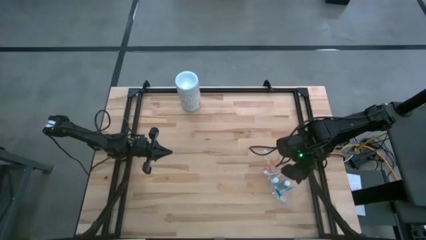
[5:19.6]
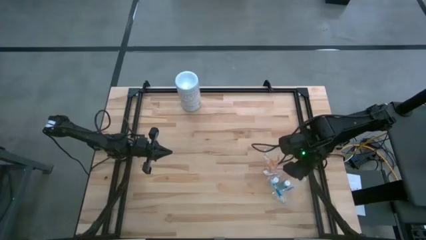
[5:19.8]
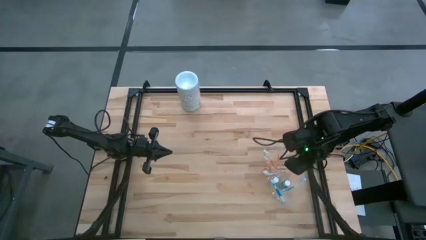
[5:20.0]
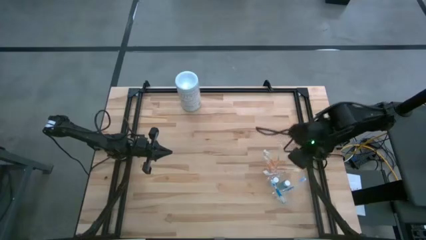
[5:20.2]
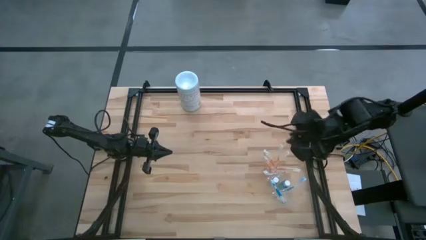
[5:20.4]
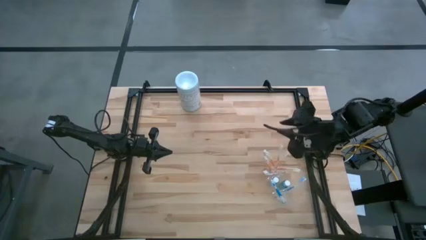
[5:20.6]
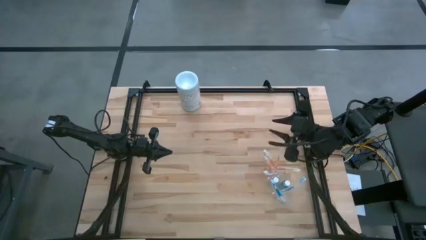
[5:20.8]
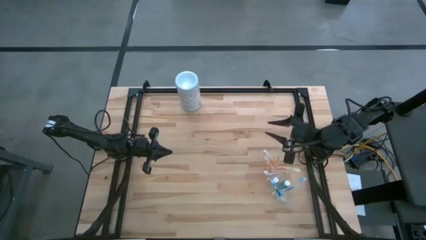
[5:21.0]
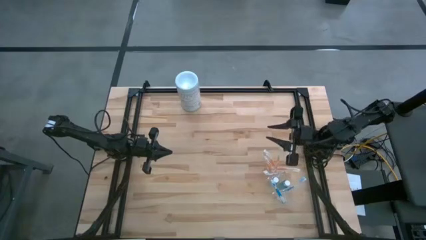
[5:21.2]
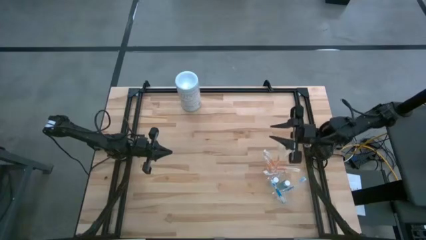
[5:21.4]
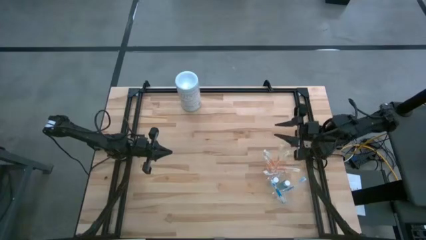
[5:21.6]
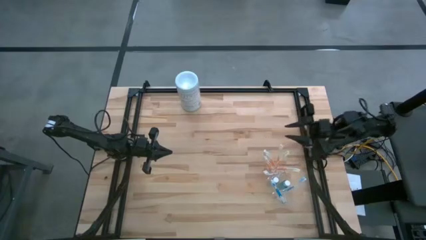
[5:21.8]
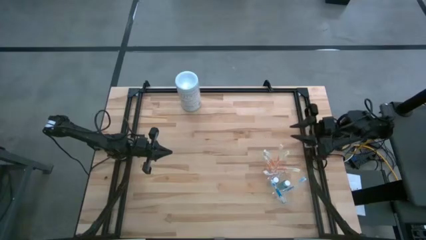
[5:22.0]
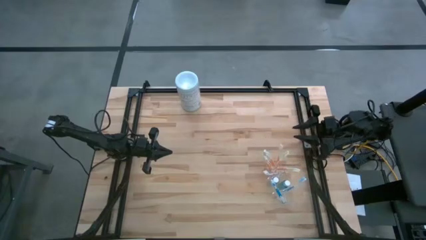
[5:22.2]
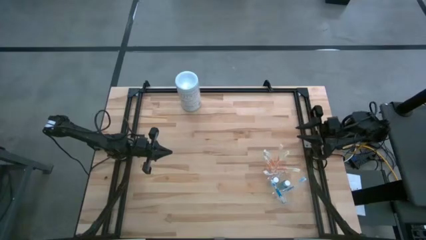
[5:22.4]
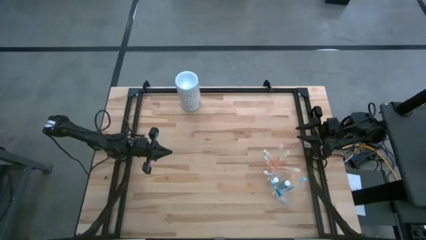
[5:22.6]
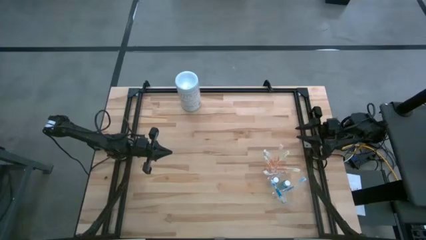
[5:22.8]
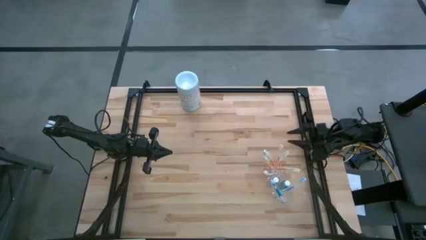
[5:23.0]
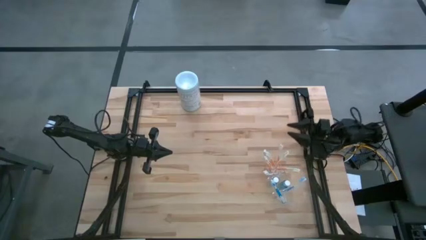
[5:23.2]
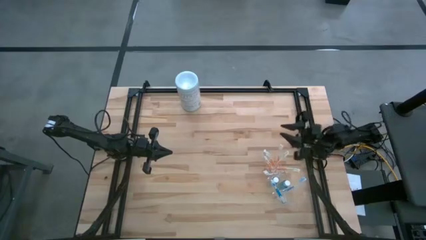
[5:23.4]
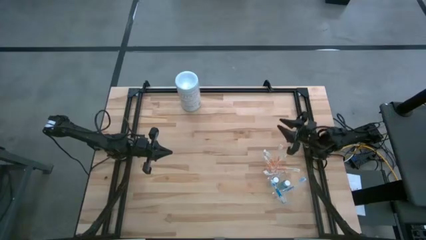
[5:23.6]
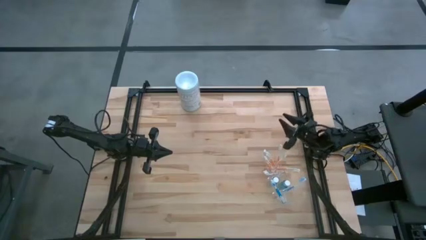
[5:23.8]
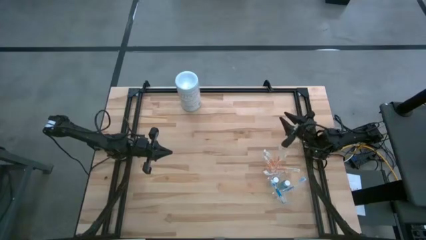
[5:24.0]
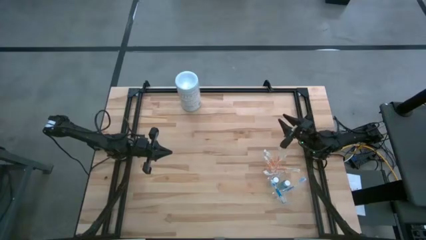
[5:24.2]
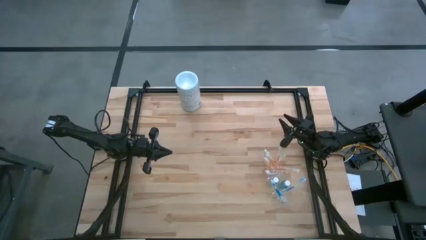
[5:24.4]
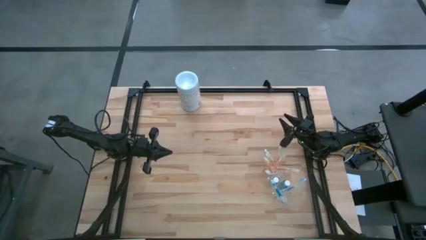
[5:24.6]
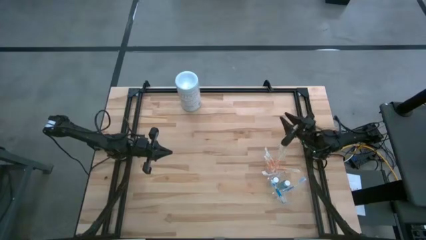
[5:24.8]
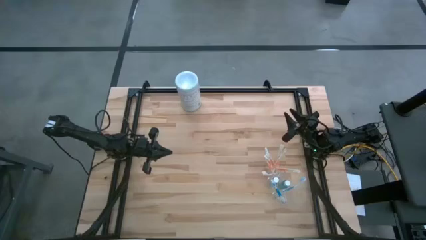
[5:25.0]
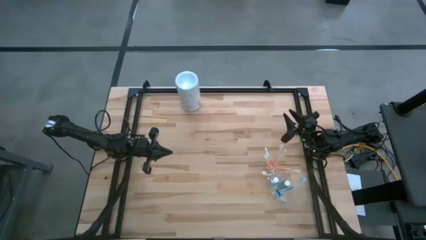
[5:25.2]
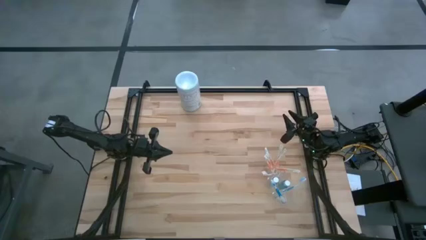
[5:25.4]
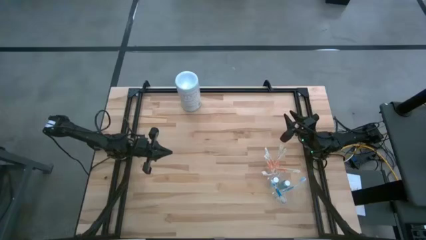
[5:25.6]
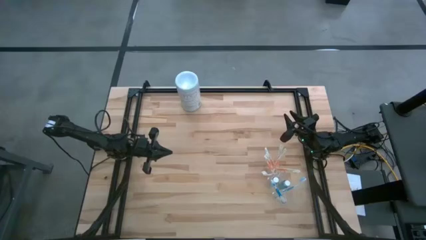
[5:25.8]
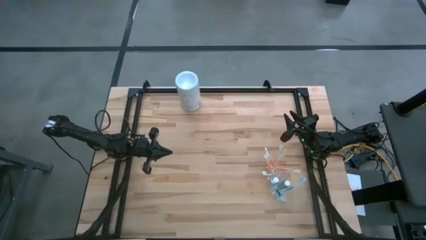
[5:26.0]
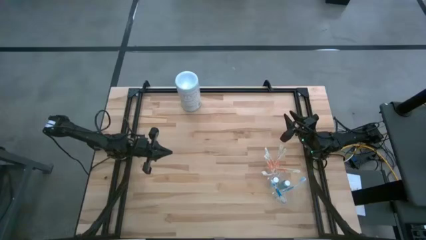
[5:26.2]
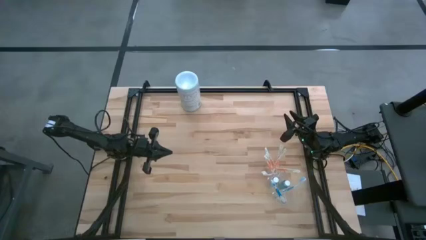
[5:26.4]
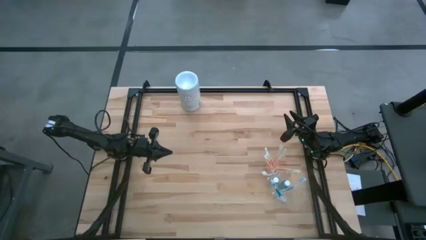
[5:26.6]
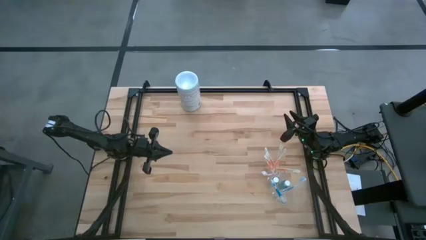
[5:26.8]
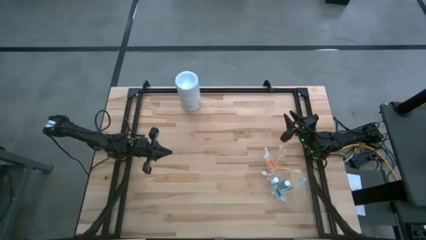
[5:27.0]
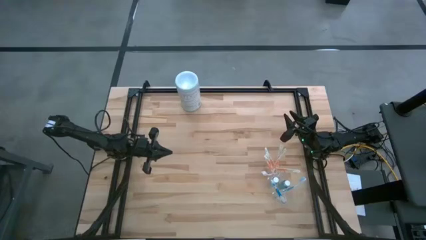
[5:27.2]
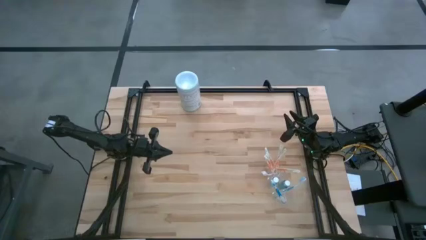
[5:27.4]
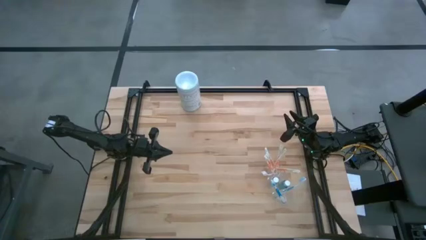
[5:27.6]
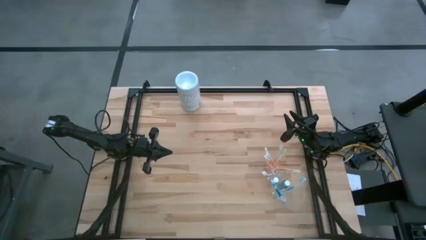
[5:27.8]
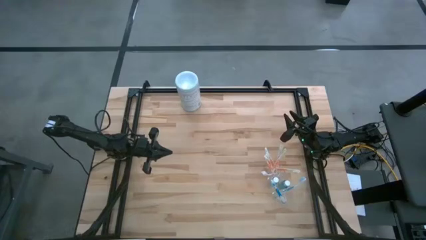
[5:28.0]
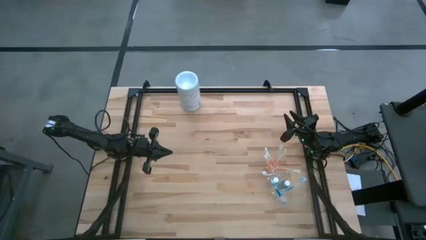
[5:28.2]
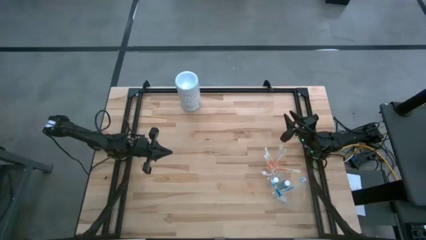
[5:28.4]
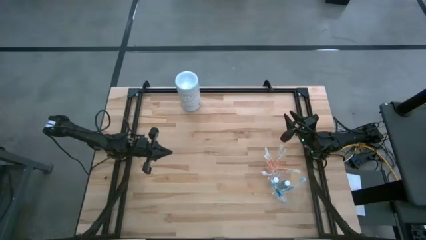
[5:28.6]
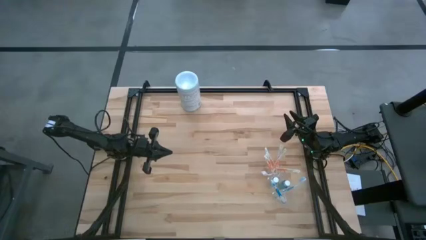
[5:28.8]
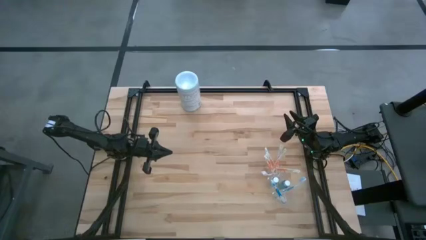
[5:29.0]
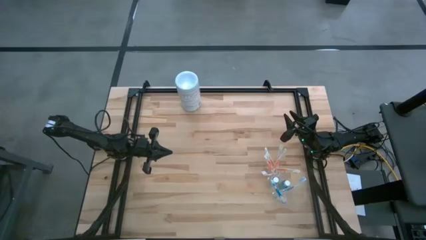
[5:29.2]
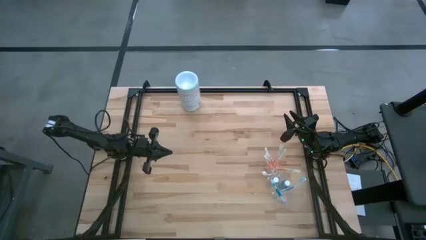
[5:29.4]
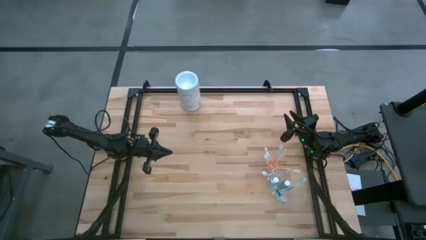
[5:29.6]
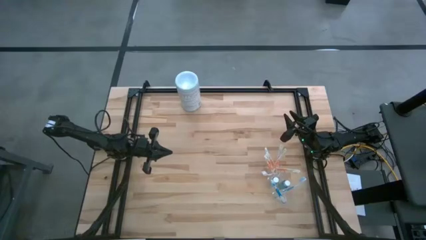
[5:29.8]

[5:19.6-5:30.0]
Task: Pick & Place toothbrushing station
Return to Home Position

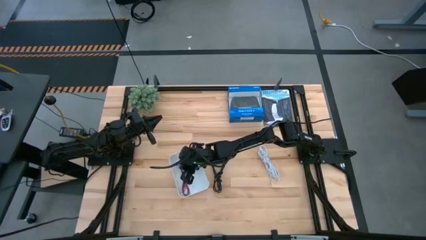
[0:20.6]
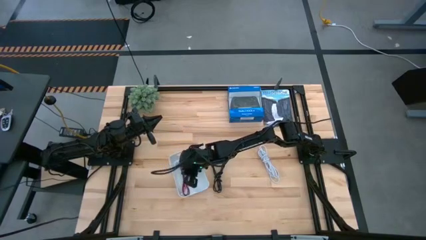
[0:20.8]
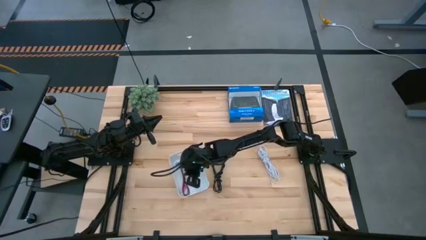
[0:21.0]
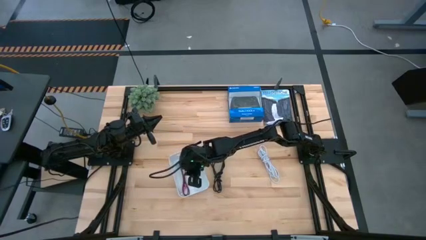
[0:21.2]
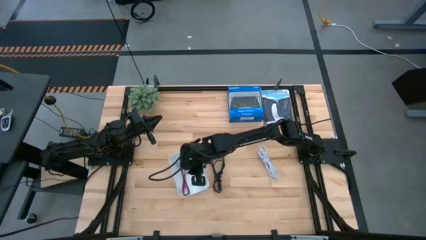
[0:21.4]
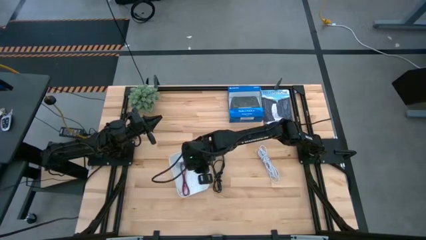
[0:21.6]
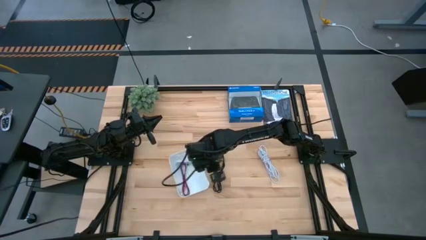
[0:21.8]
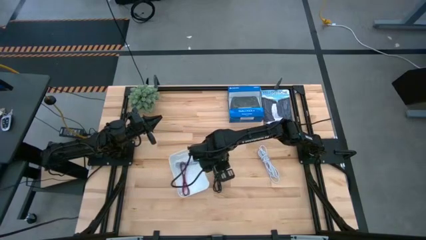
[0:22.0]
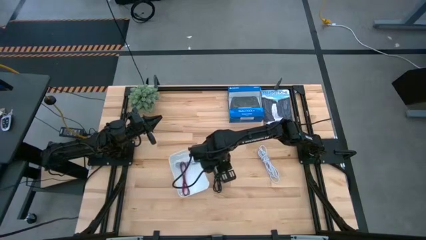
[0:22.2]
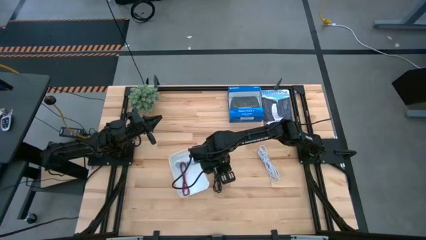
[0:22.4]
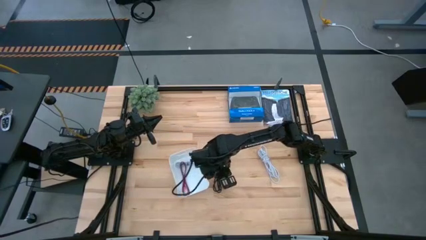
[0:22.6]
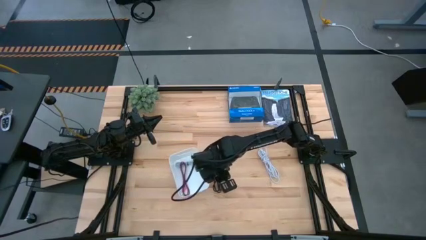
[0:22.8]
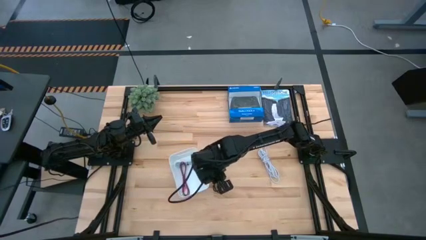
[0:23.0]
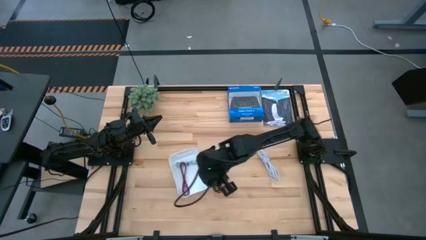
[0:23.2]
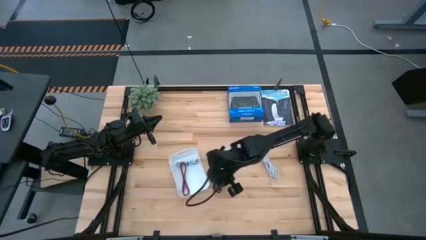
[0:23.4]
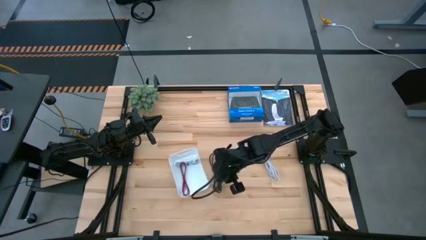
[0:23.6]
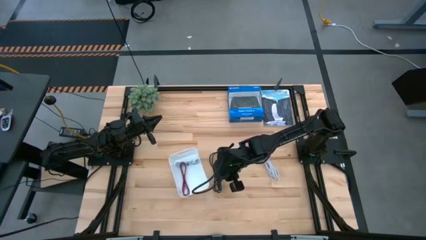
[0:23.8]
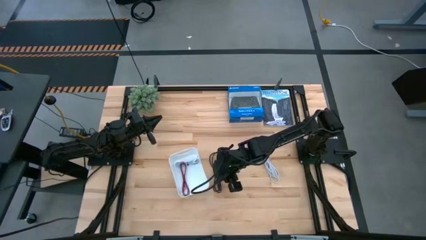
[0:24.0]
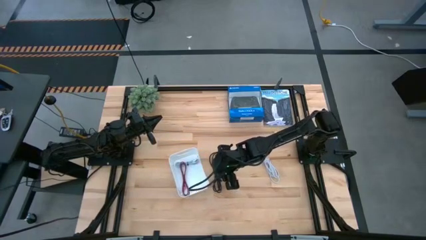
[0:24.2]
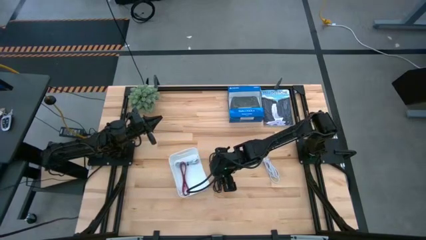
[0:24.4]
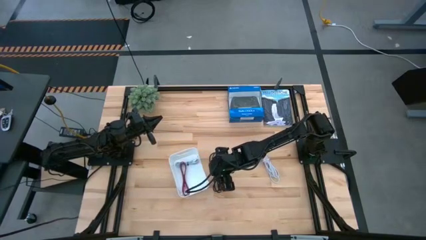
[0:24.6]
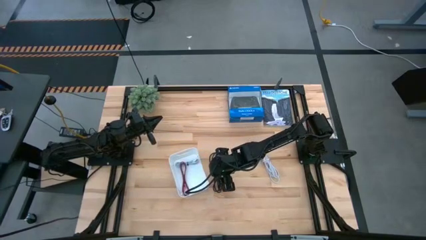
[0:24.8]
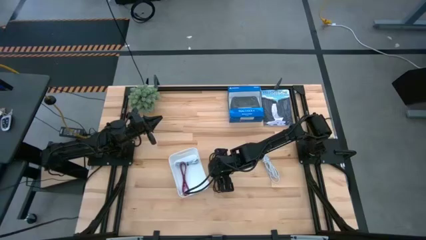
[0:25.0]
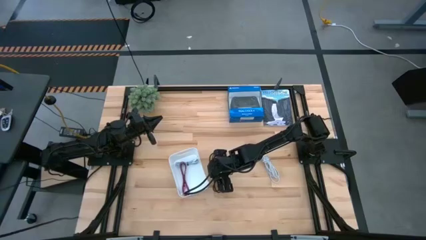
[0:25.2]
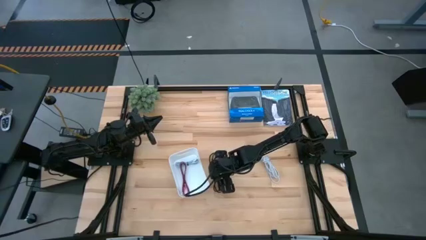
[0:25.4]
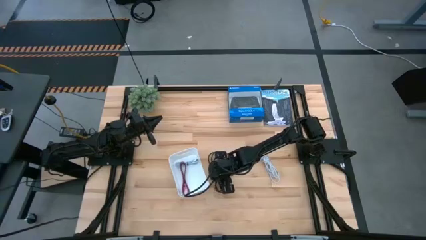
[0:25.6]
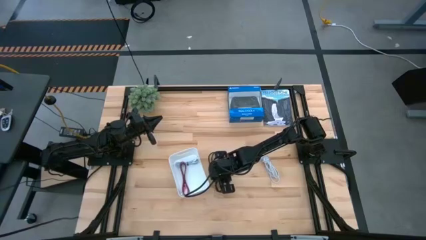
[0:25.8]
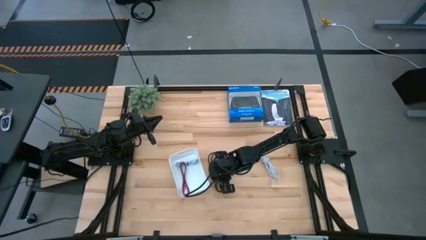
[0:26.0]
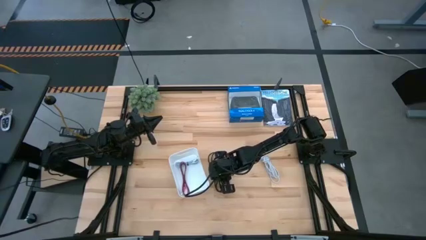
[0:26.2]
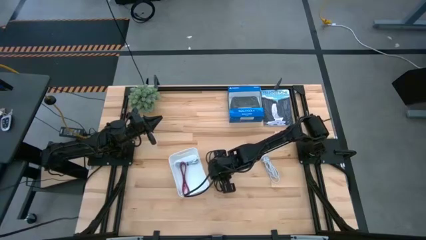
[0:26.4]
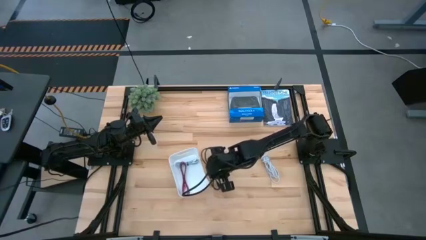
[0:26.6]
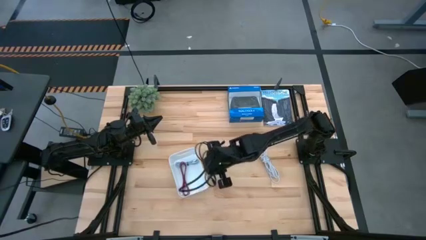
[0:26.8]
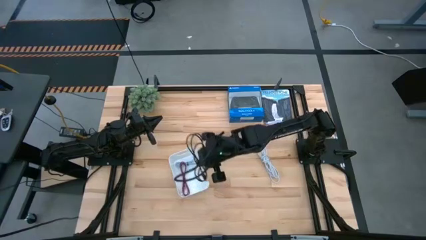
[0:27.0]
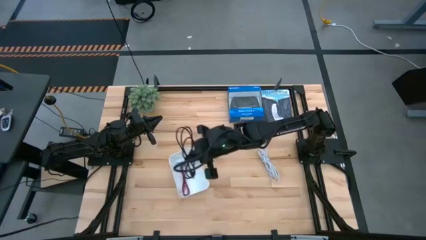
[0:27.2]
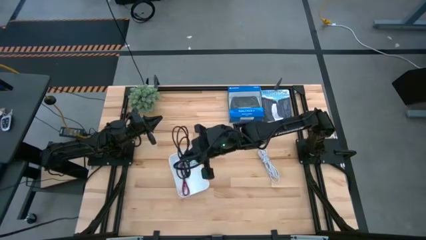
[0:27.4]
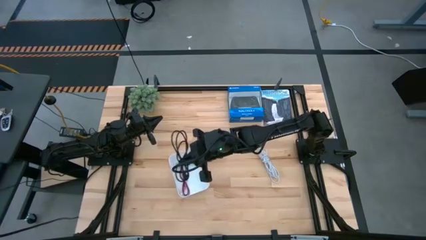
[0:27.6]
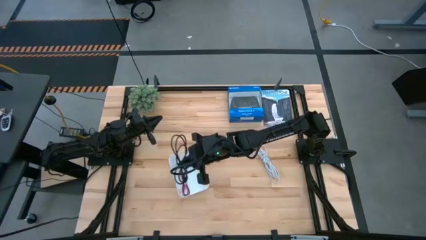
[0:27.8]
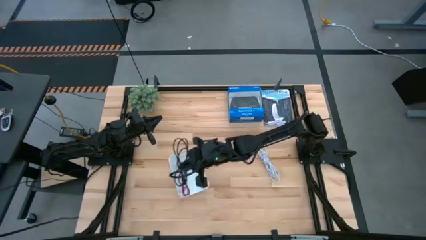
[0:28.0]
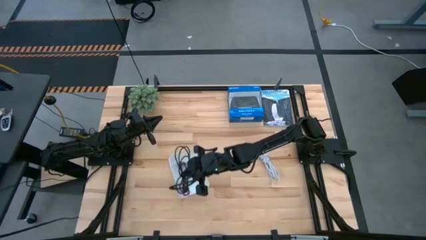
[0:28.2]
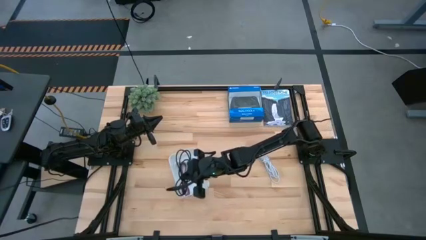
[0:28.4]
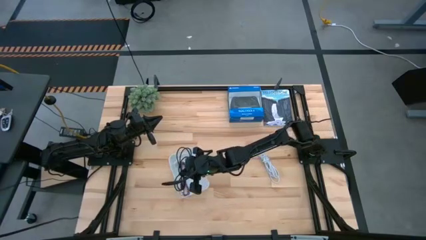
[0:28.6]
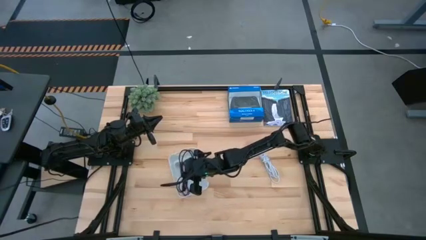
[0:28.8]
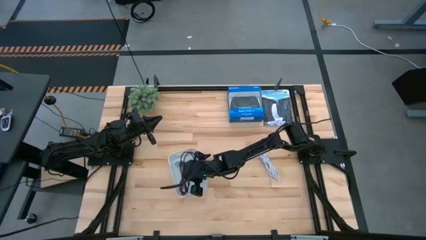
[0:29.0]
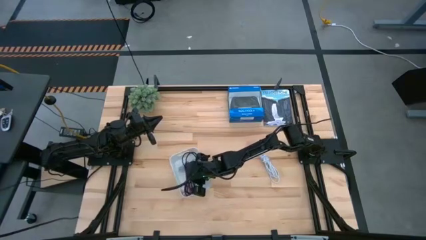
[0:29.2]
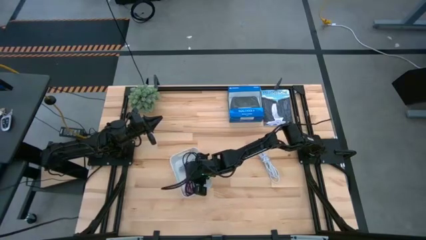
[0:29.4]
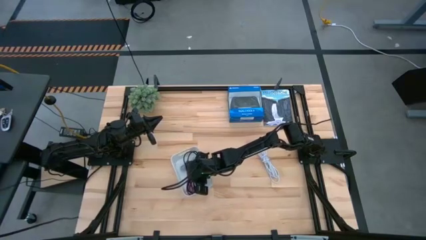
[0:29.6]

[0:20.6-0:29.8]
Task: Pick and place USB-C Cables
Put the black charger cable into the white bin
